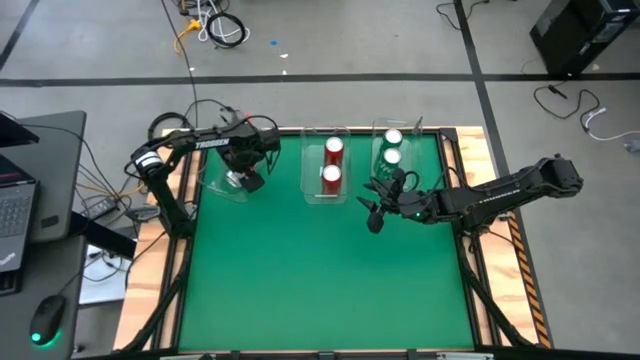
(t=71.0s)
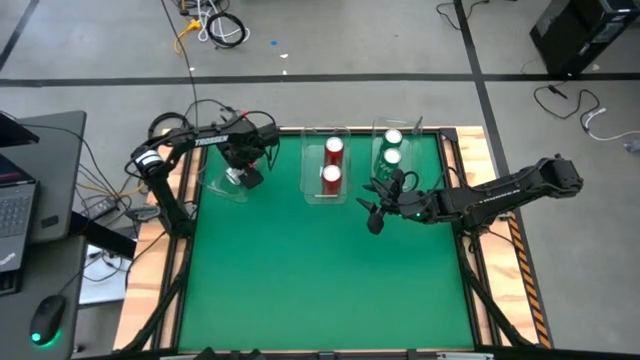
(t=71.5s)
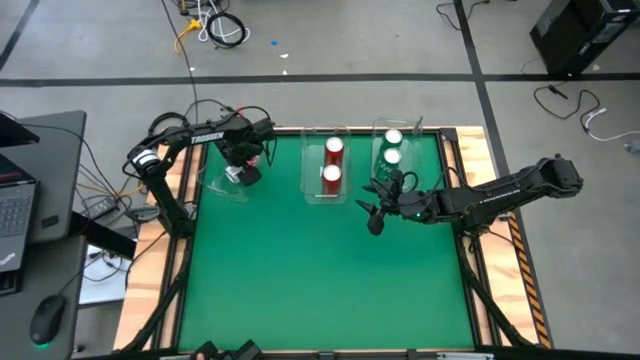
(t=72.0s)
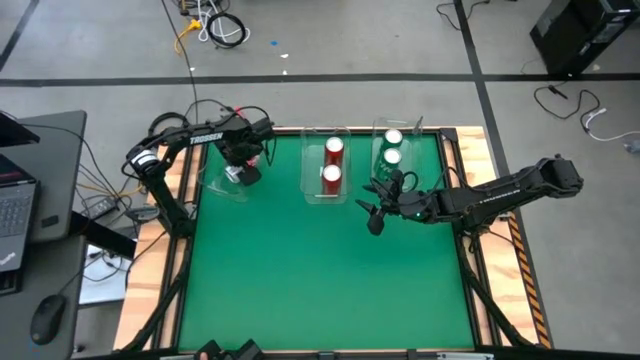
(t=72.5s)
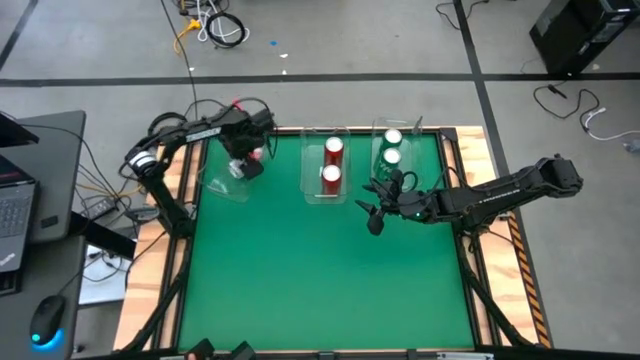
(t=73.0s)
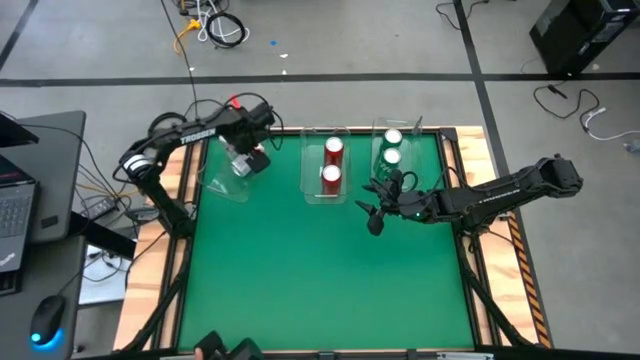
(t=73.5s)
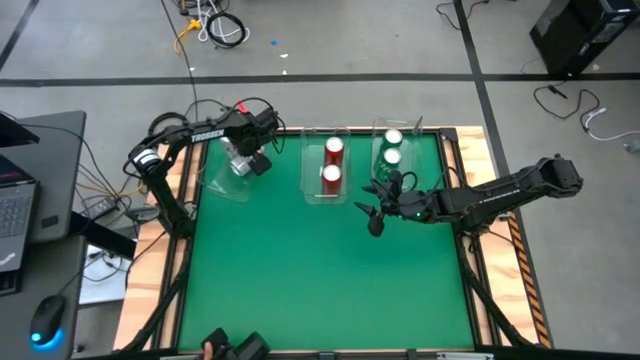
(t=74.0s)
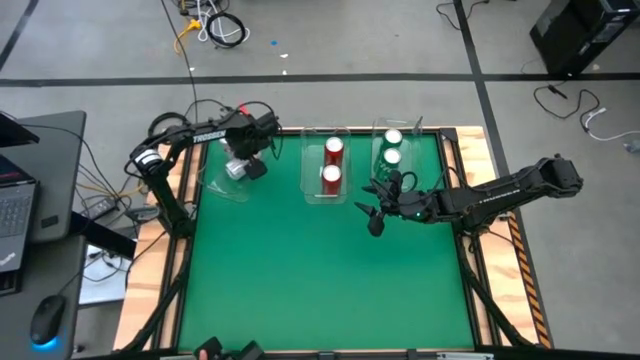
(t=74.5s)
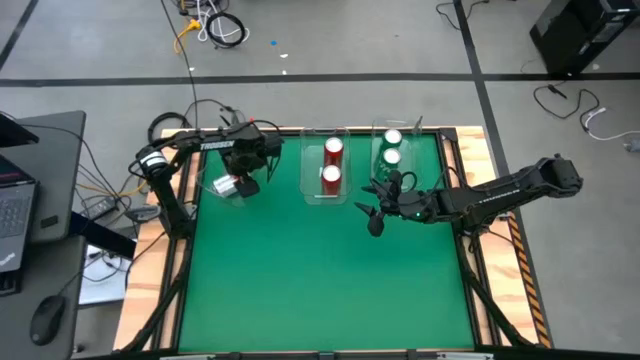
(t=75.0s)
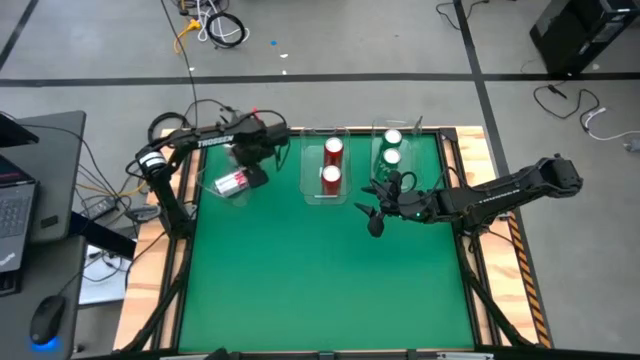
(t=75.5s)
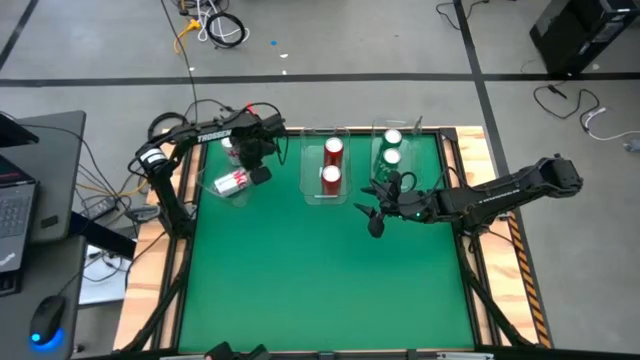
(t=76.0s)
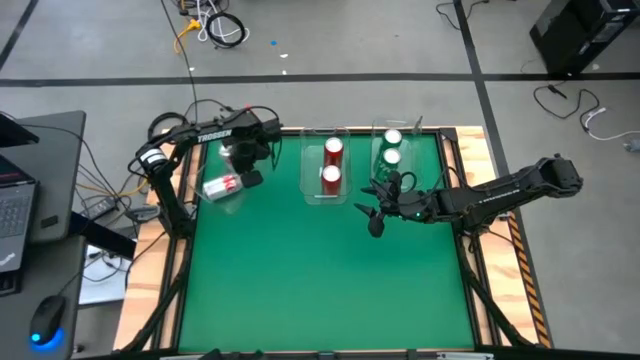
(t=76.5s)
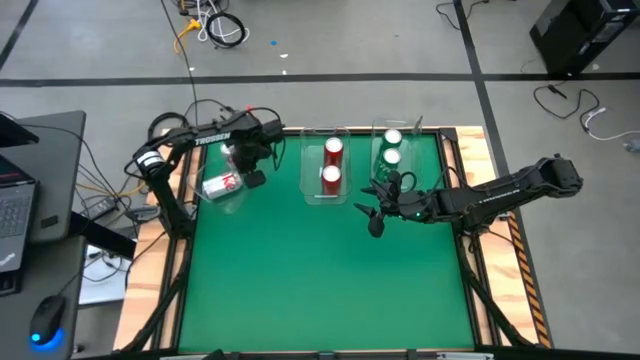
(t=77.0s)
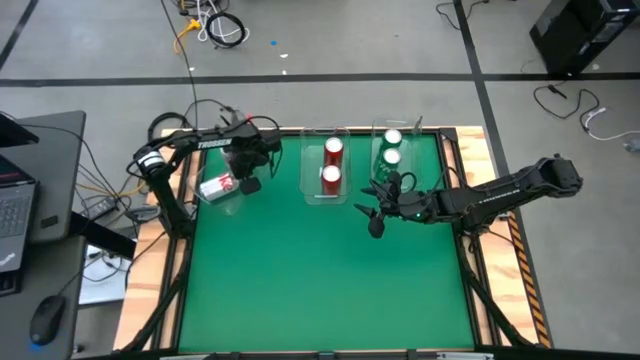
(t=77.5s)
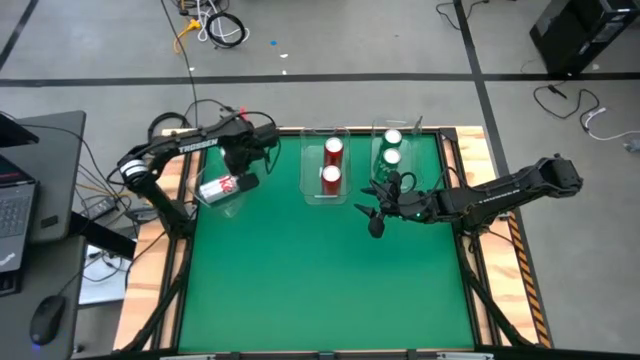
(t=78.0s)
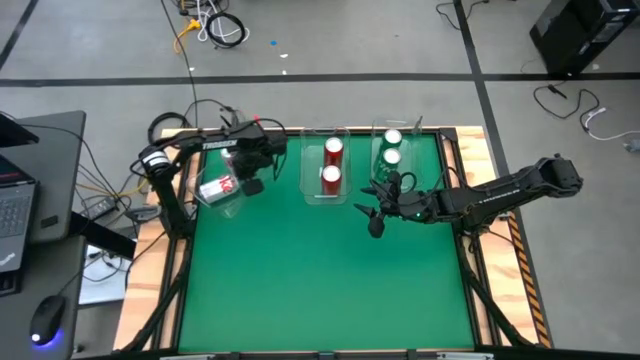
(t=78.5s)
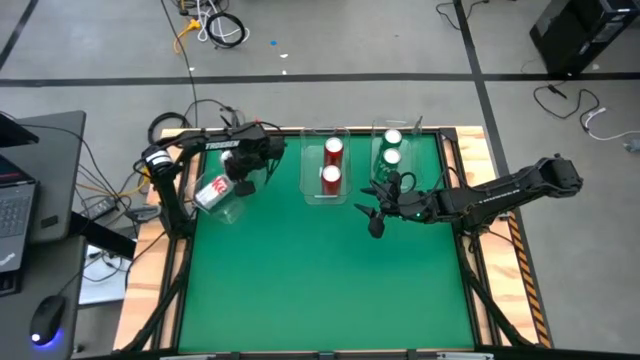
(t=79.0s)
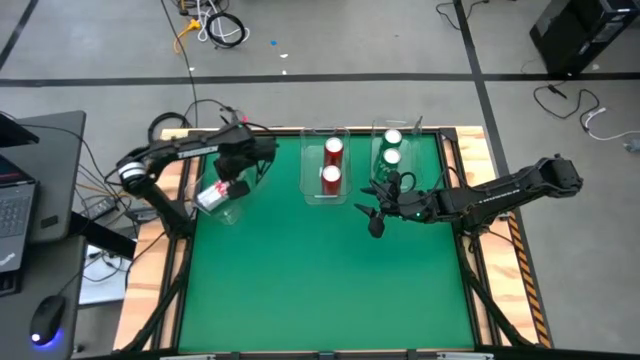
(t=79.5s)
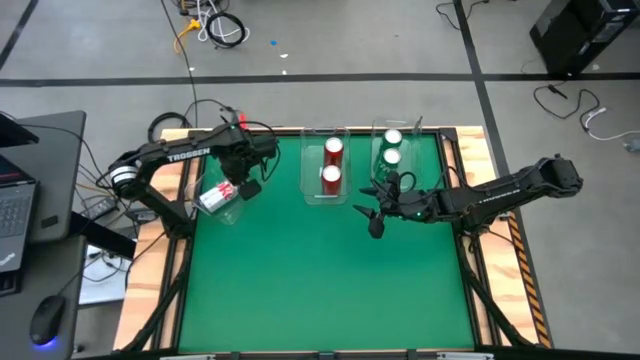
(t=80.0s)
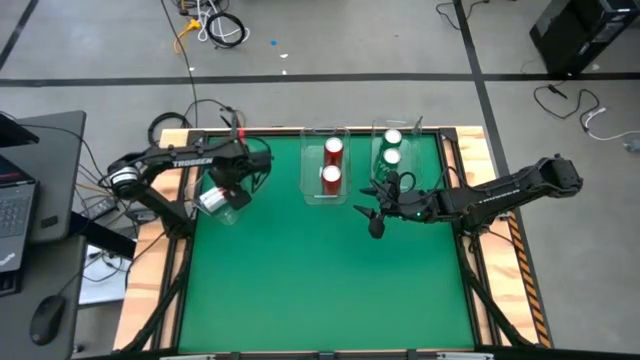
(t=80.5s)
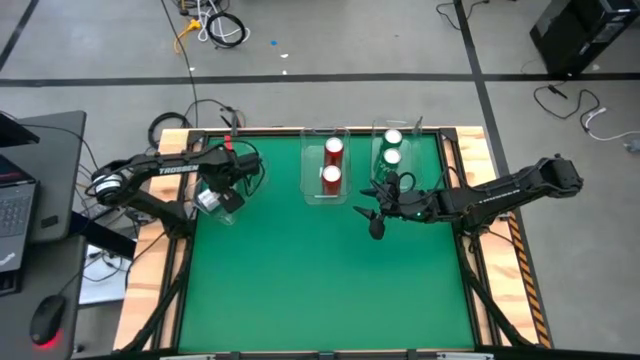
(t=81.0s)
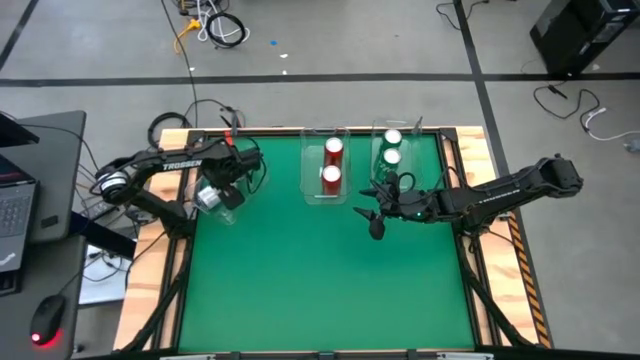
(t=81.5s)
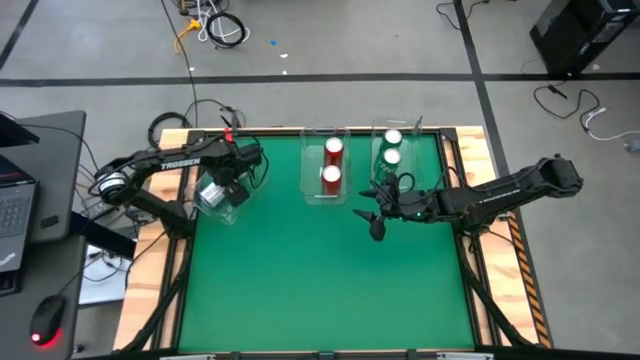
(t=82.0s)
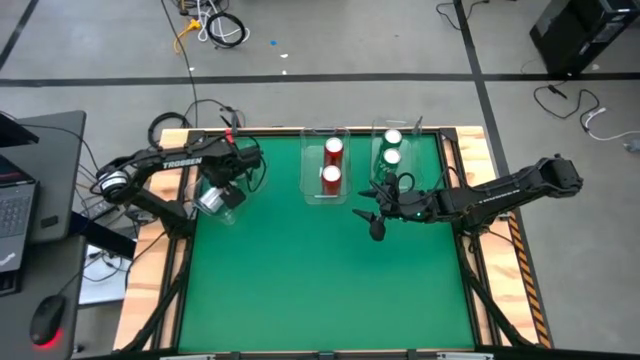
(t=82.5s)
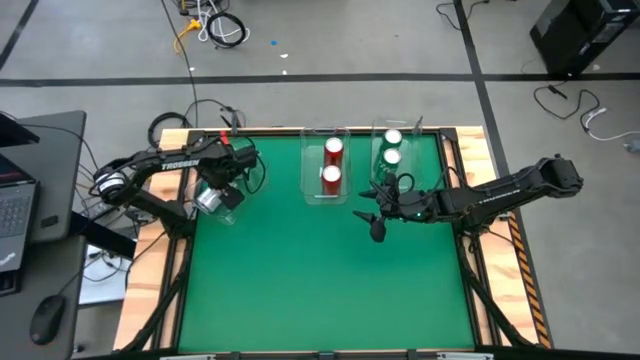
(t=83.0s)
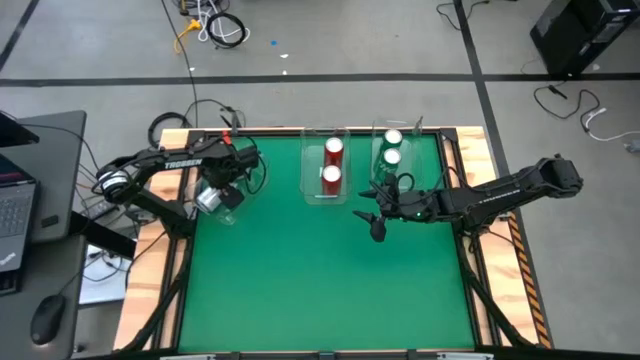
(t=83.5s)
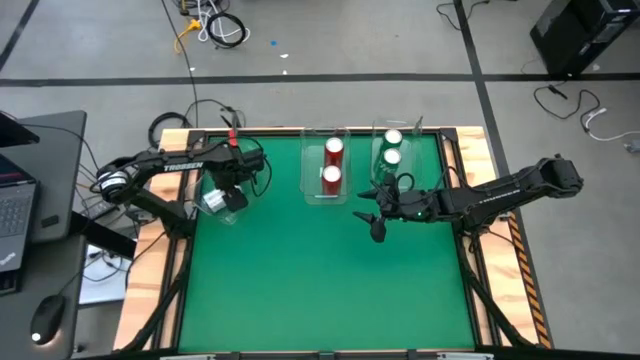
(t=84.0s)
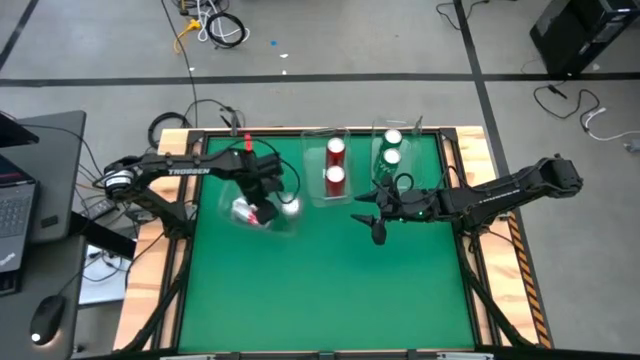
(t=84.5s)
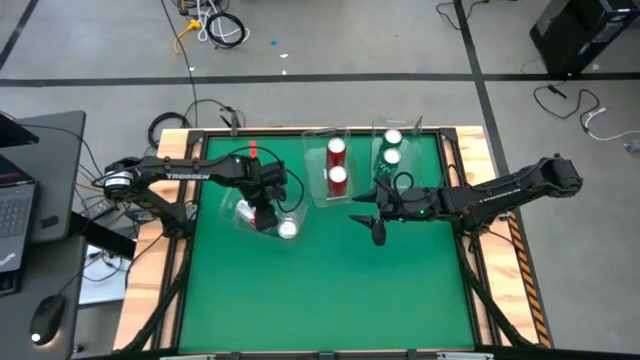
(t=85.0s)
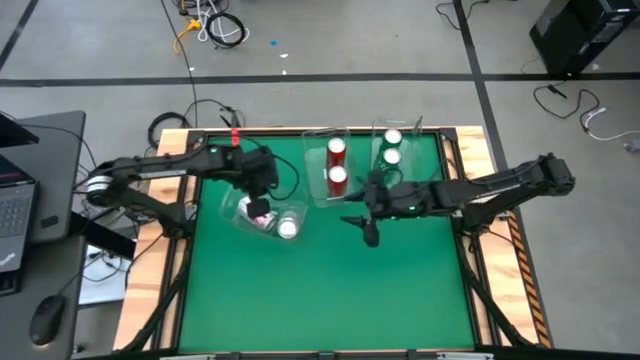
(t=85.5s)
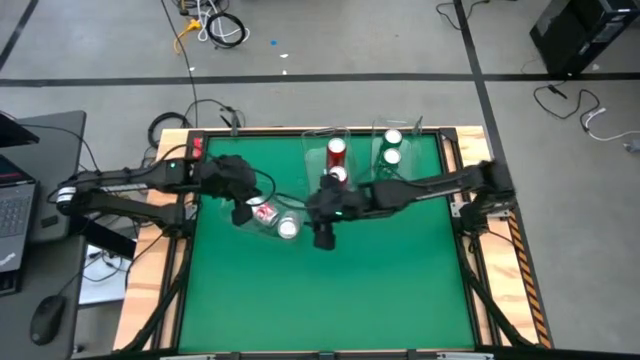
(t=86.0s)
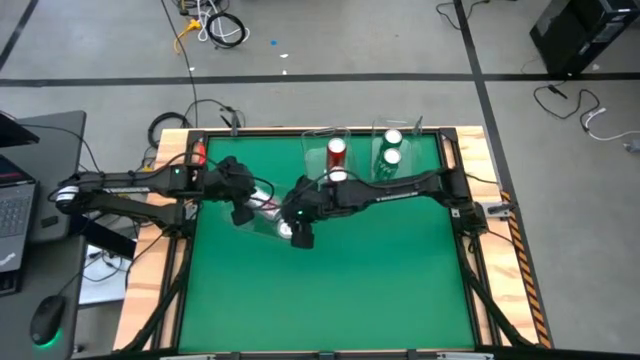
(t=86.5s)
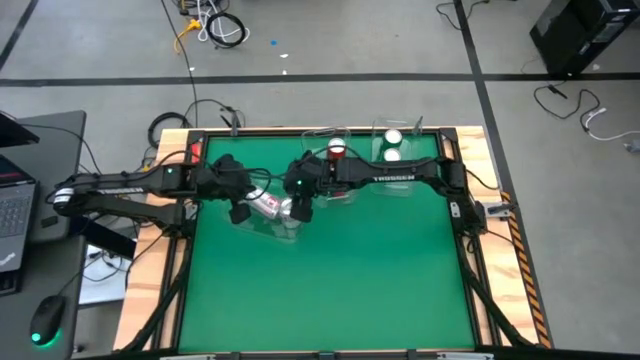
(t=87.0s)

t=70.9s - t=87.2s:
Task: Sort soda cans
Put the red-silver soda can into the left transparent bin

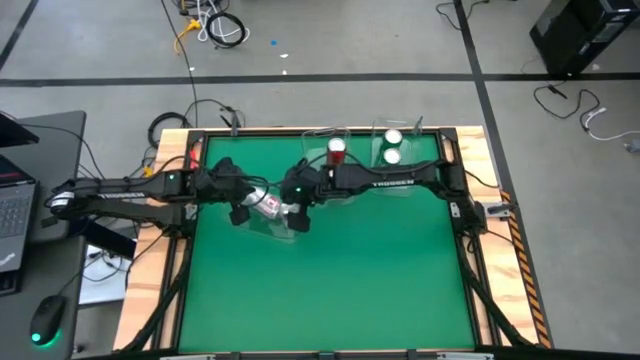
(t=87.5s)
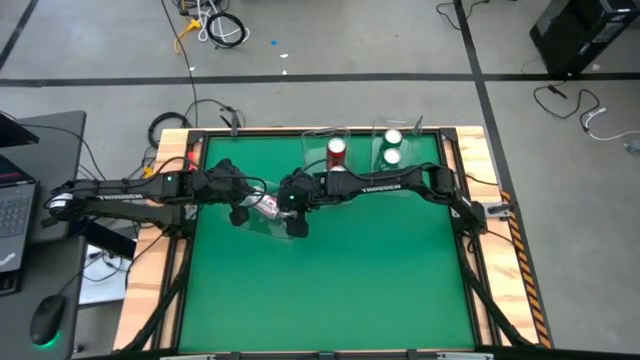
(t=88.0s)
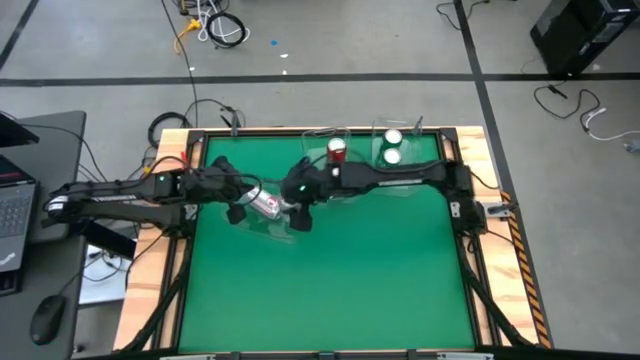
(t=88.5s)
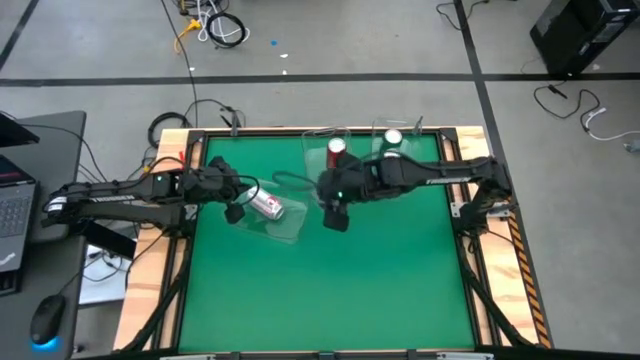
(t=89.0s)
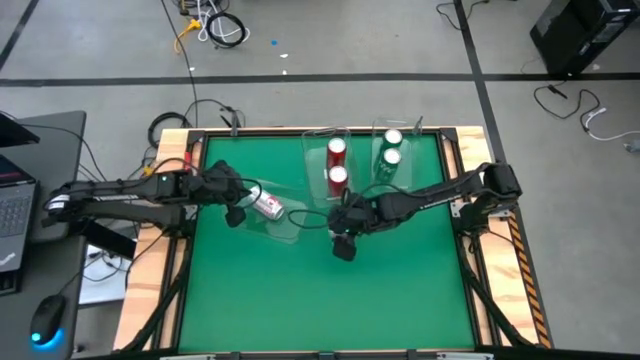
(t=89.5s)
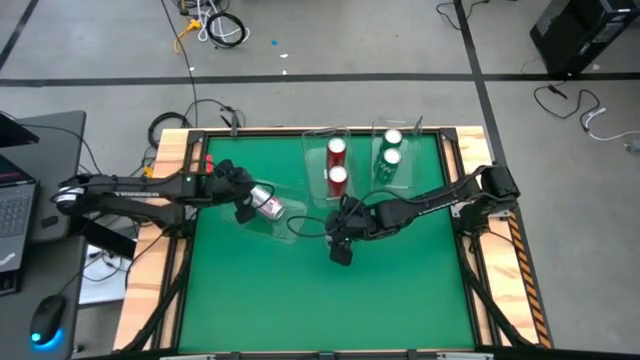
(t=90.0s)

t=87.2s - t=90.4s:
Remove the right red-silver soda can from the left transparent bin

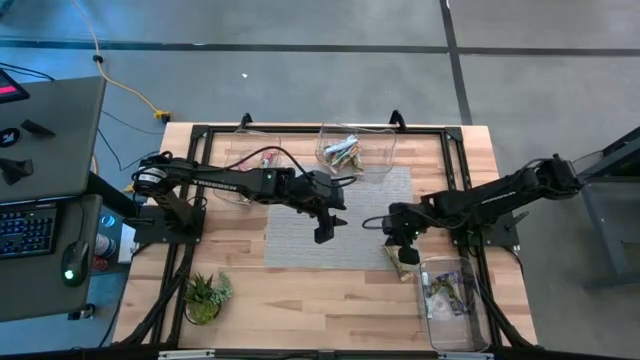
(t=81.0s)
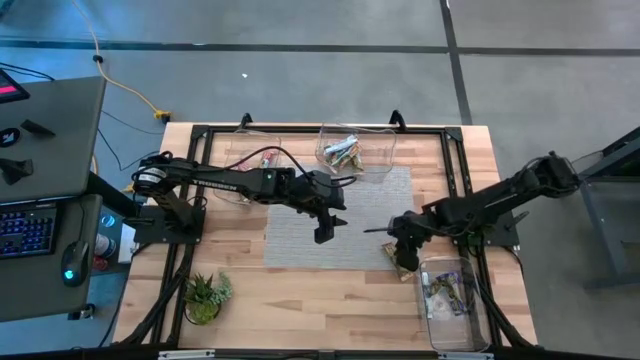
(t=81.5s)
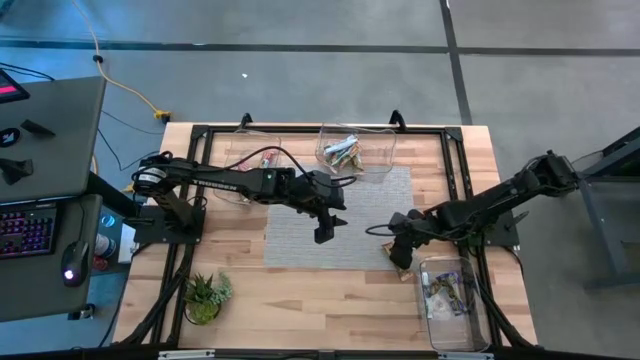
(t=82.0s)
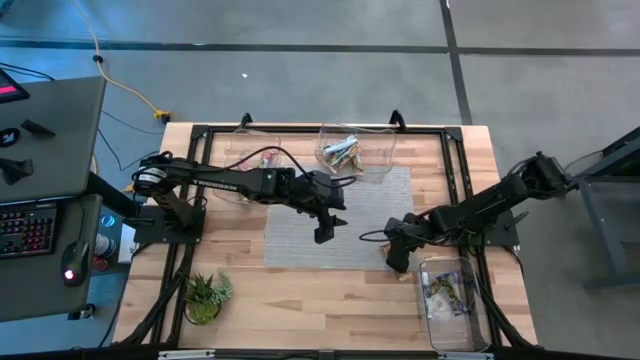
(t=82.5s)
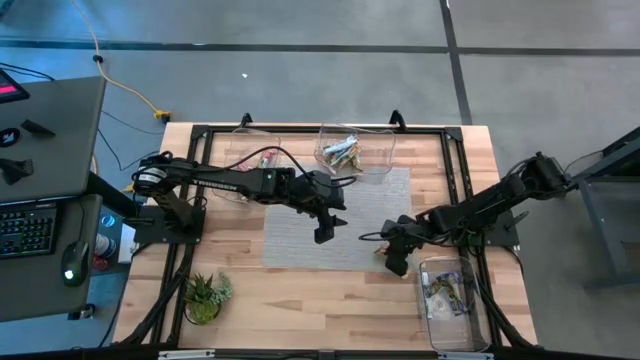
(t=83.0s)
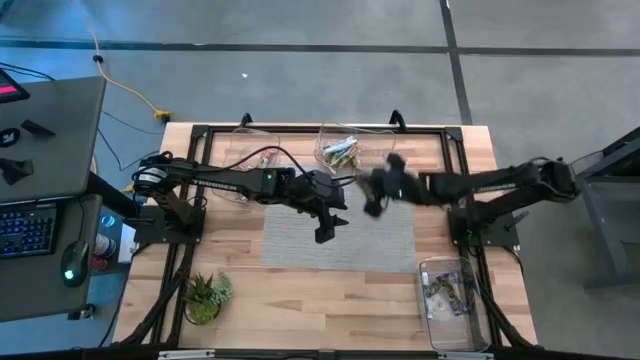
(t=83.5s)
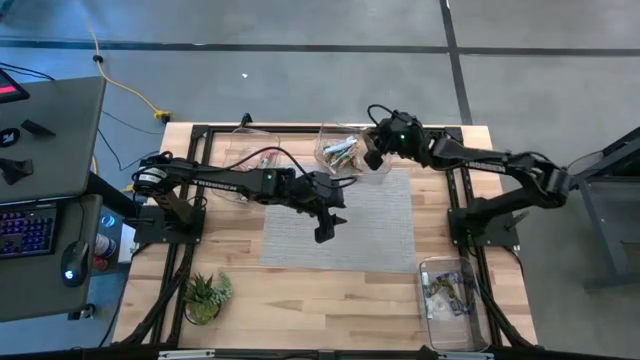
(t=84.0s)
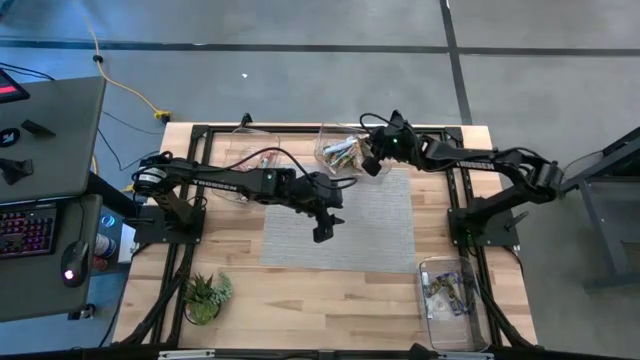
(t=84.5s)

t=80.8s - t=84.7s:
Task: Pick and place Granola Bars by type
Put the yellow granola bar into the top right transparent bin
